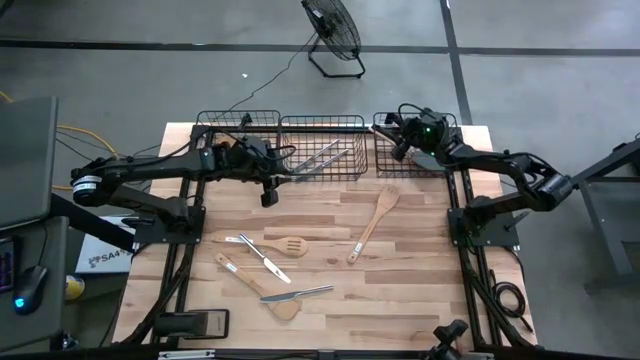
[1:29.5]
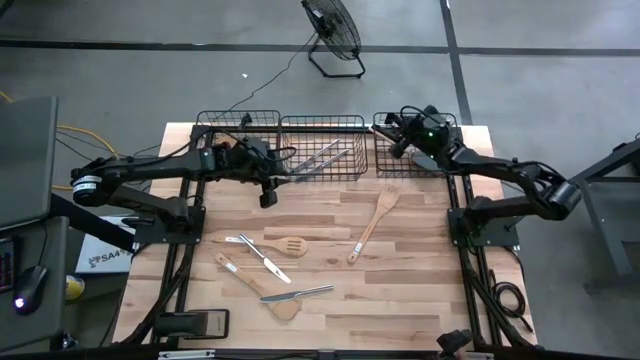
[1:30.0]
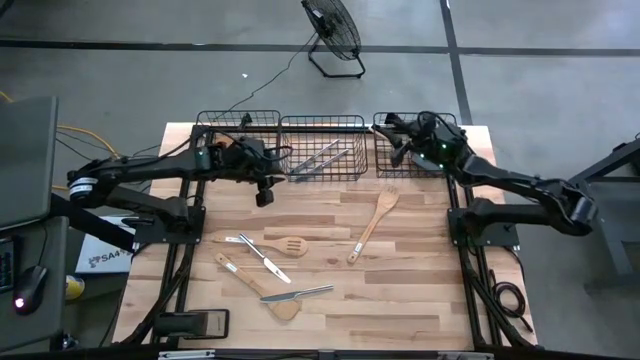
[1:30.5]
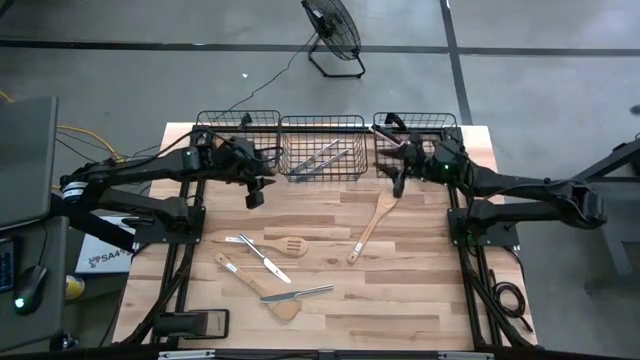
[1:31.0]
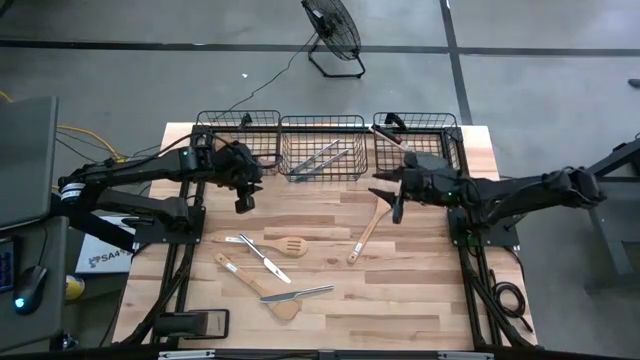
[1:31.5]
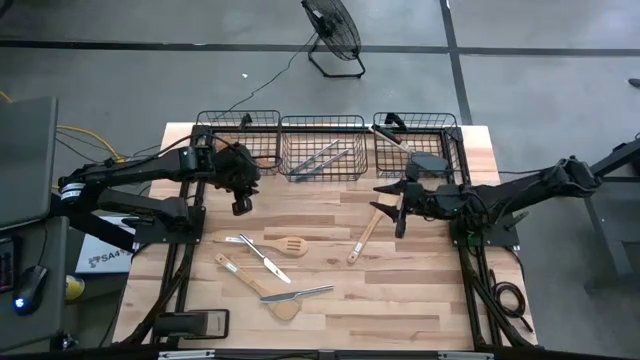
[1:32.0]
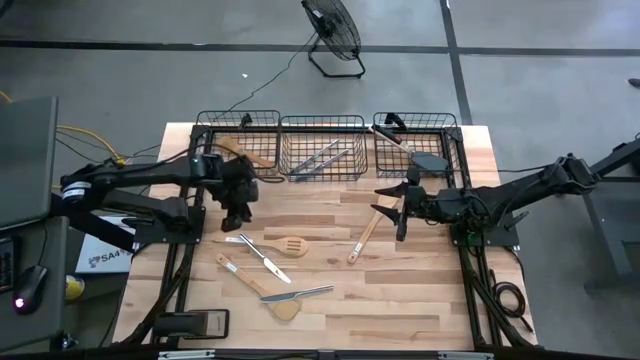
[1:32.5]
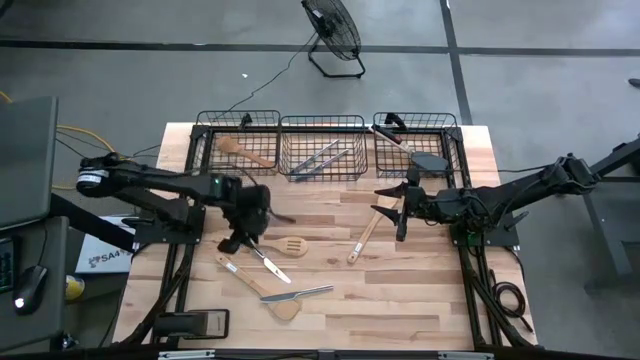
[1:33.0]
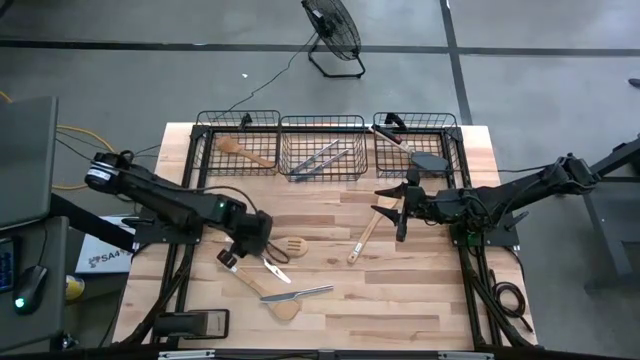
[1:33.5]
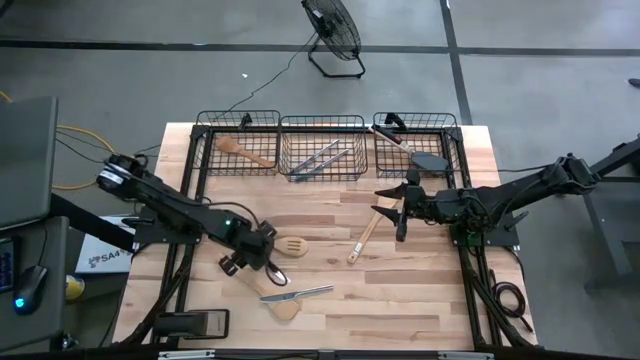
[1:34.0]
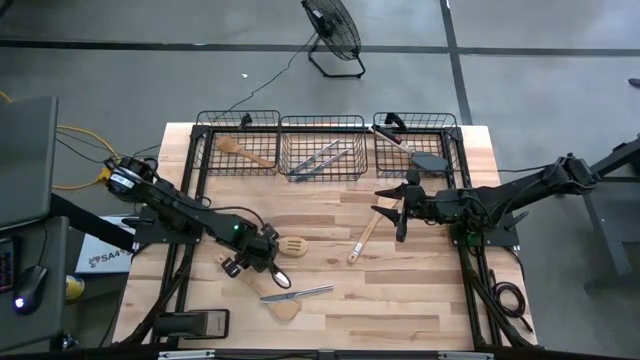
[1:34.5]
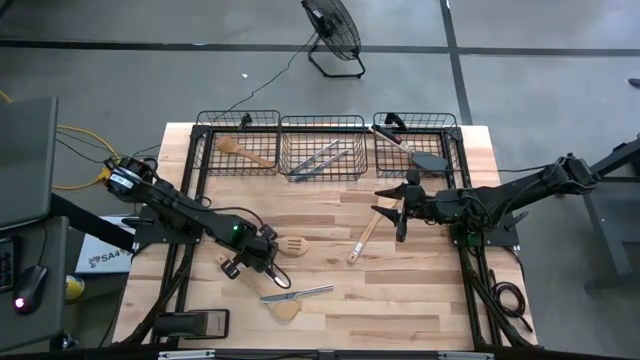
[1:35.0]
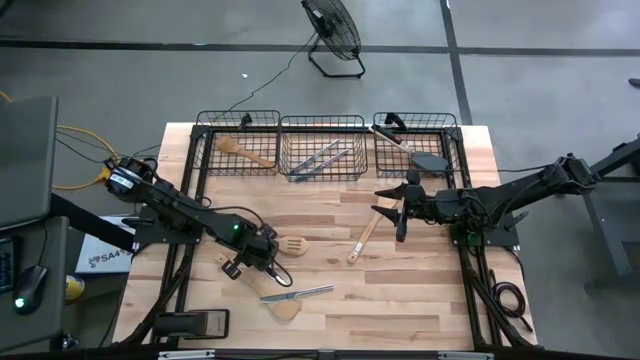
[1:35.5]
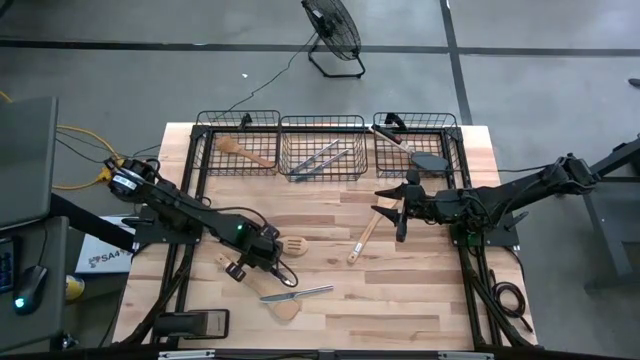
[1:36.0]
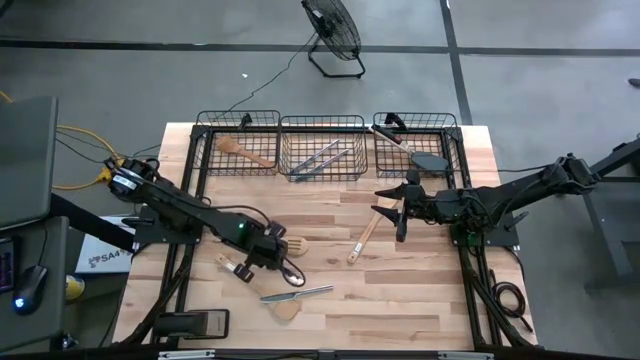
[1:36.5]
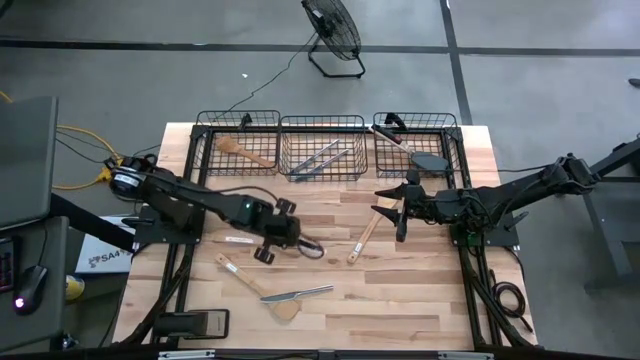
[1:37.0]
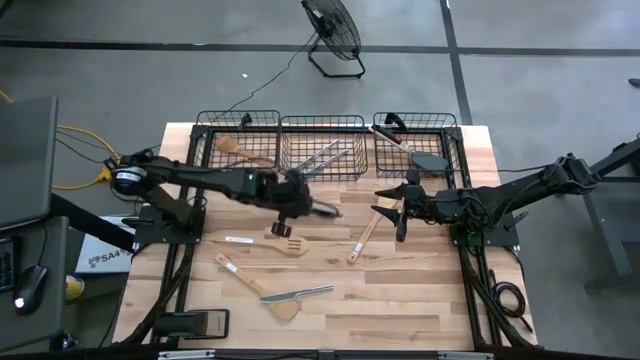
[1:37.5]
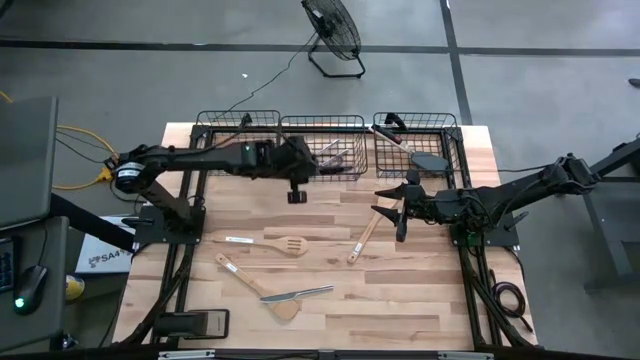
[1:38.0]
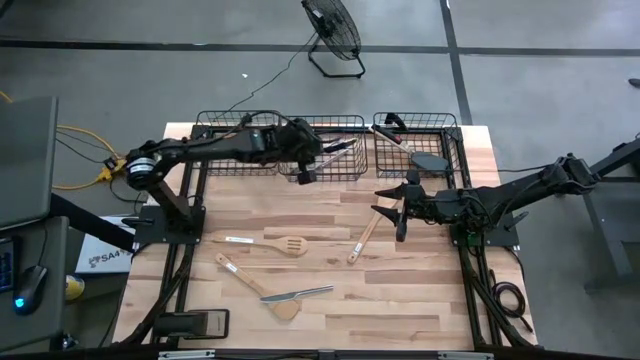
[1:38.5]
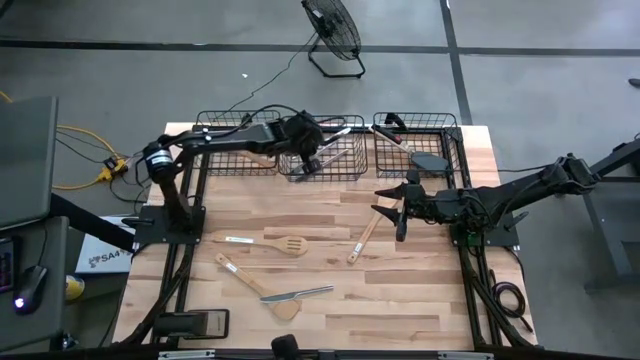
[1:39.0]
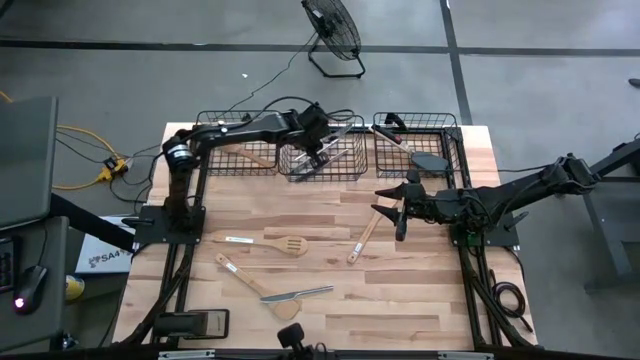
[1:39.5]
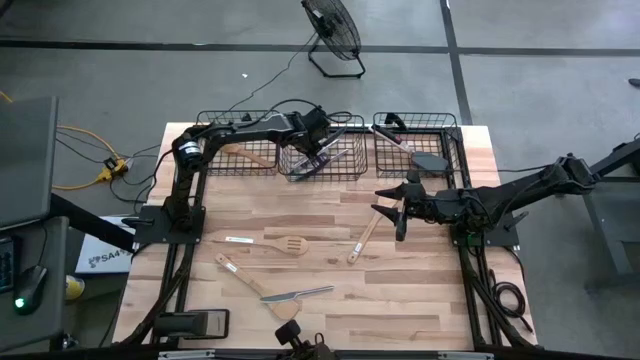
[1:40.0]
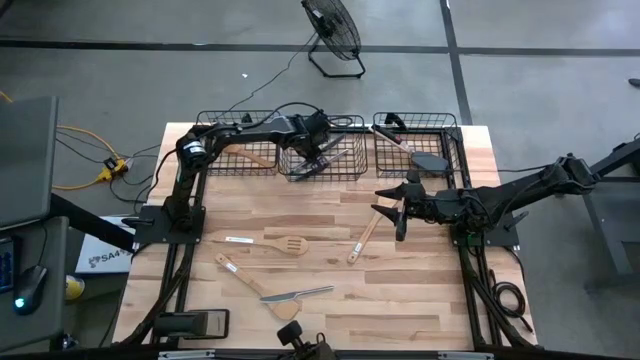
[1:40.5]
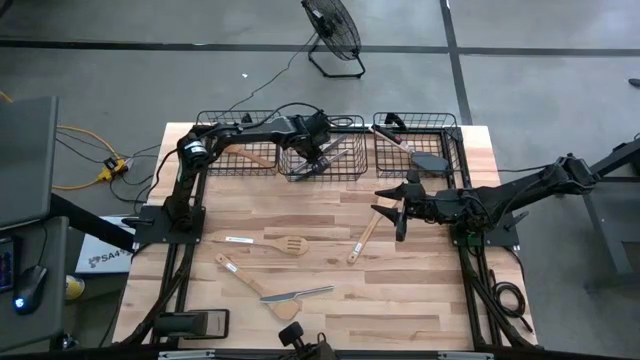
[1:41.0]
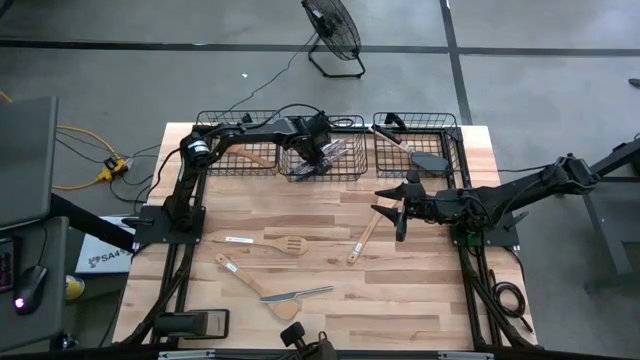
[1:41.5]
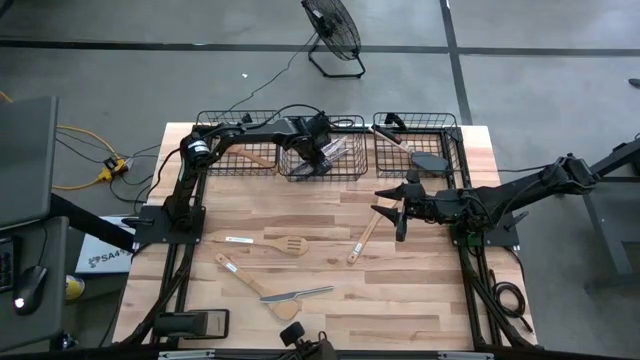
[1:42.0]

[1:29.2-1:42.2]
Task: Pick & Place Kitchen Items
Put the silver table knife into the middle mesh basket

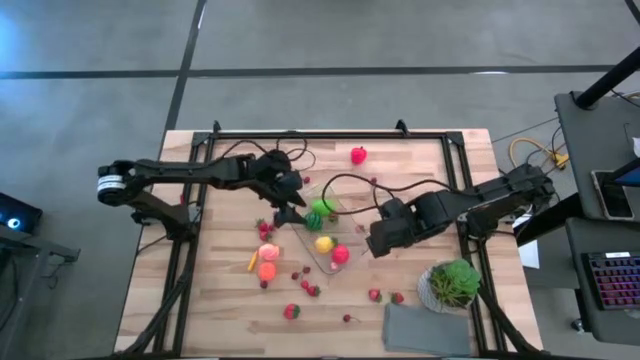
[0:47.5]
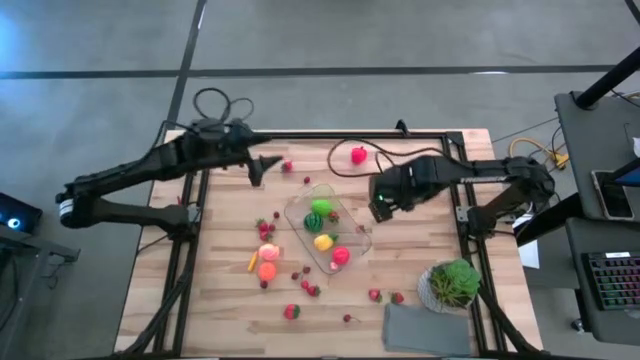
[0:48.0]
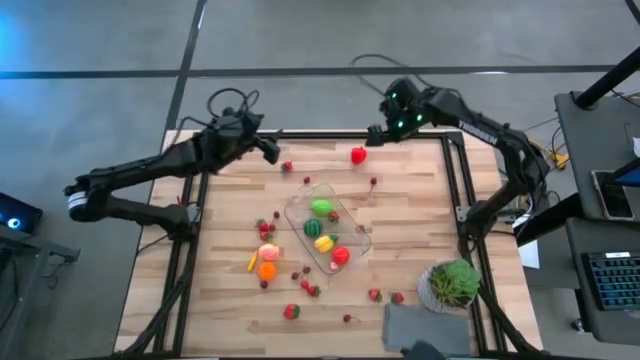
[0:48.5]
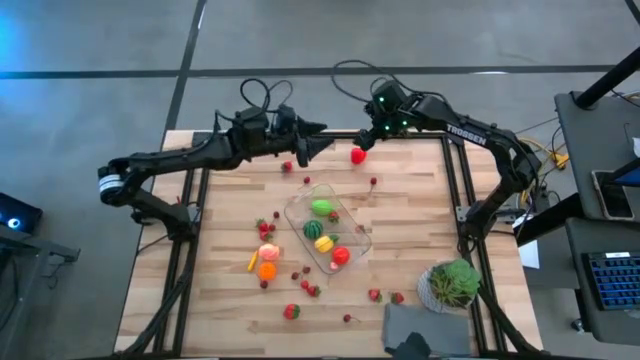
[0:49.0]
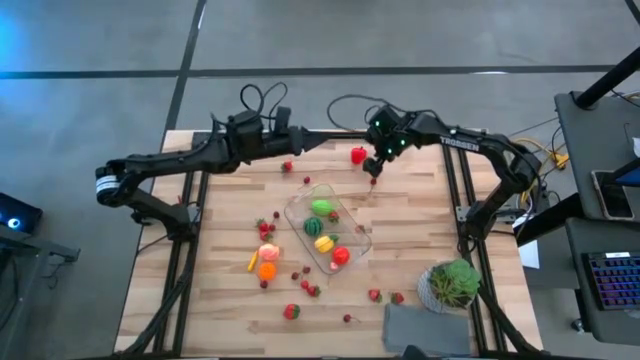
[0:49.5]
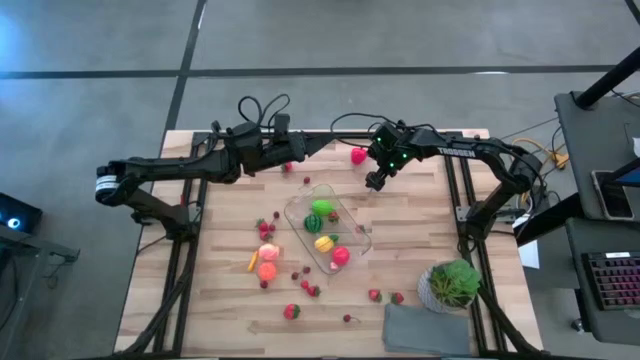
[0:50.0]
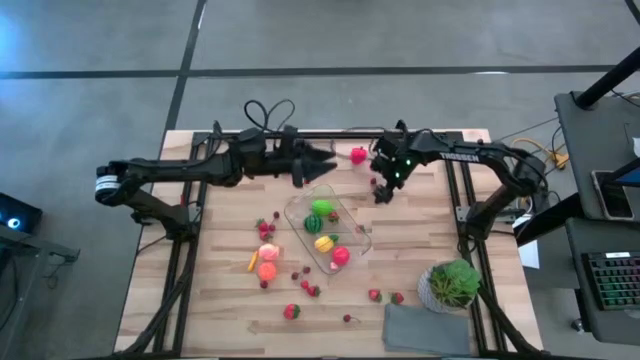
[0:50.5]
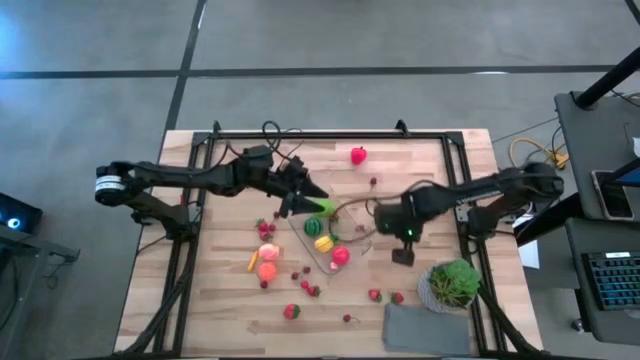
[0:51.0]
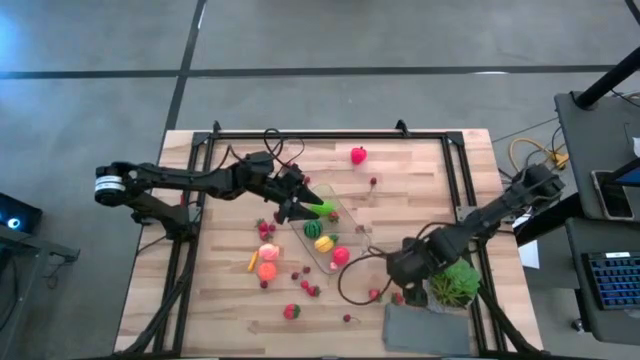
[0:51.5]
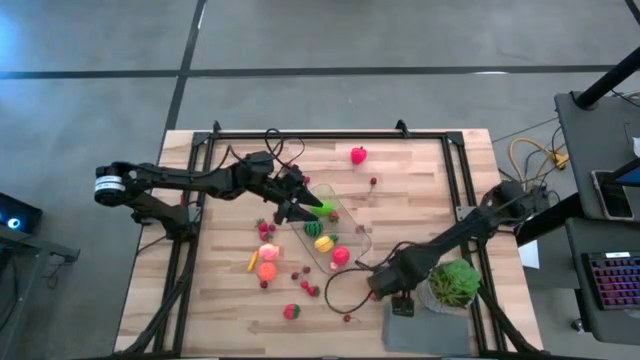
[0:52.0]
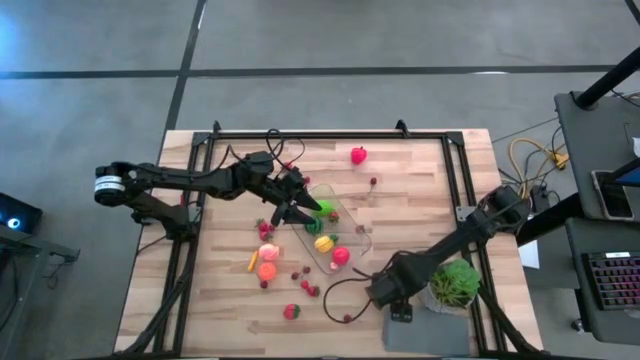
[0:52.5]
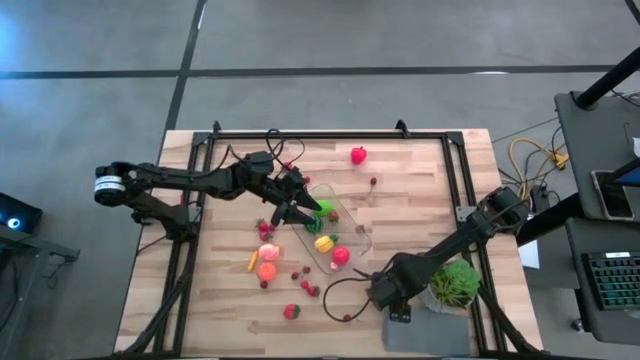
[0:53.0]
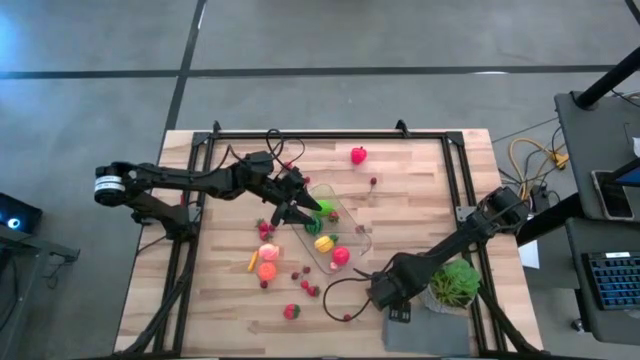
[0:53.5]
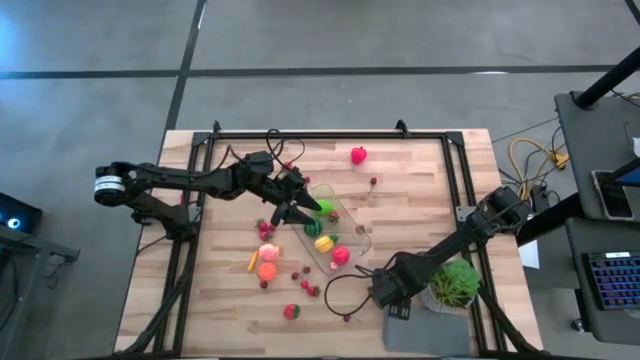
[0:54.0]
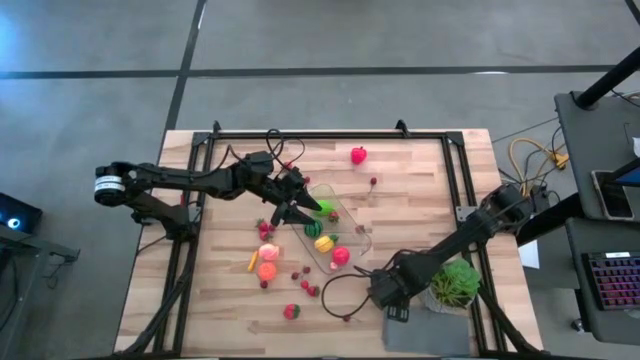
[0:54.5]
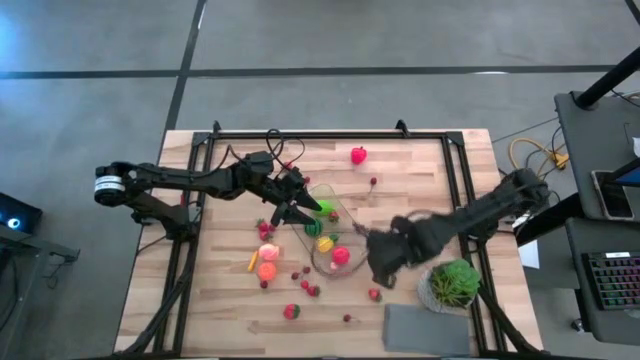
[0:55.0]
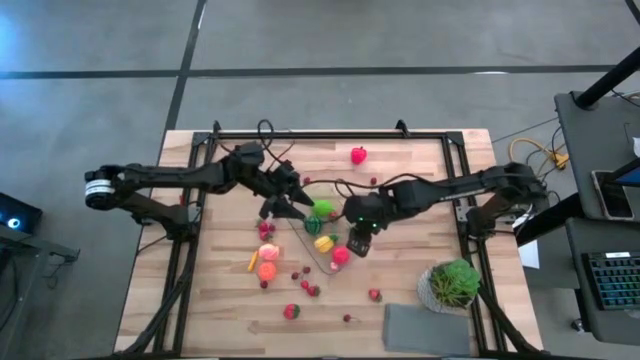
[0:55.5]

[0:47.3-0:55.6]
Task: Pick and placing Produce into tupperware
Put the red strawberry into the transparent bin
